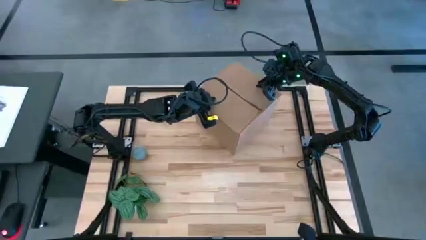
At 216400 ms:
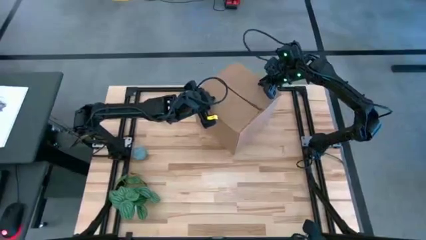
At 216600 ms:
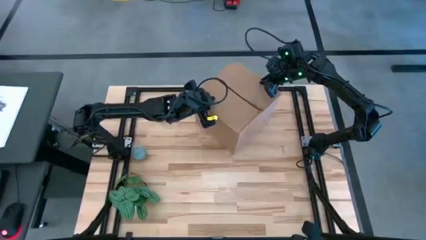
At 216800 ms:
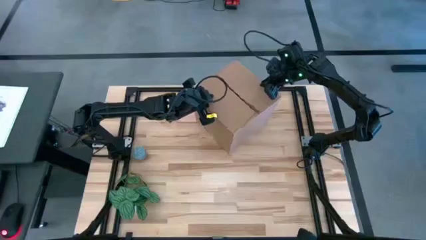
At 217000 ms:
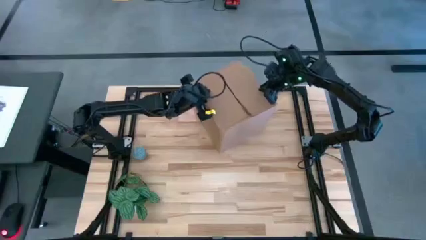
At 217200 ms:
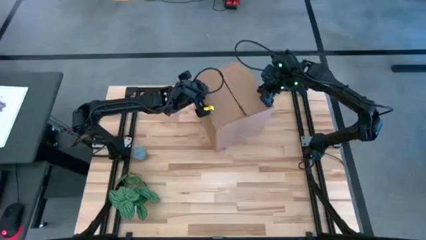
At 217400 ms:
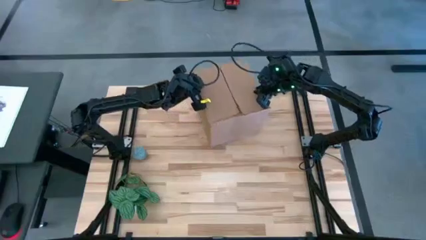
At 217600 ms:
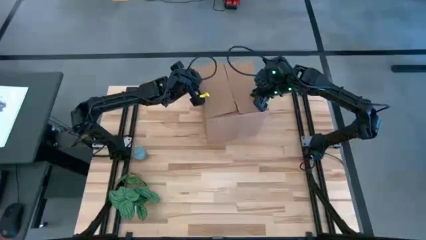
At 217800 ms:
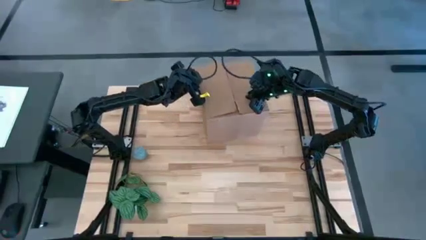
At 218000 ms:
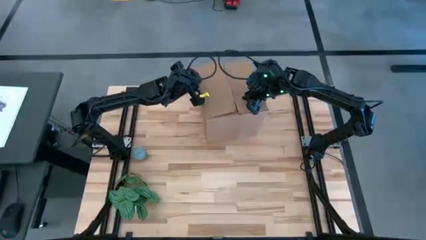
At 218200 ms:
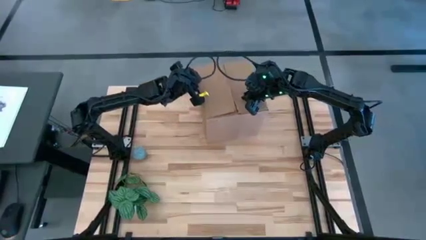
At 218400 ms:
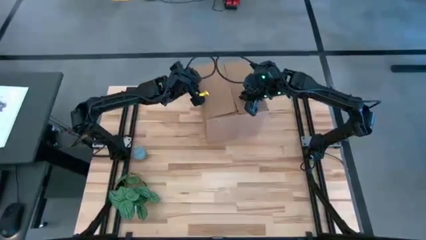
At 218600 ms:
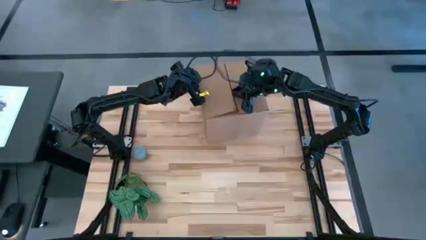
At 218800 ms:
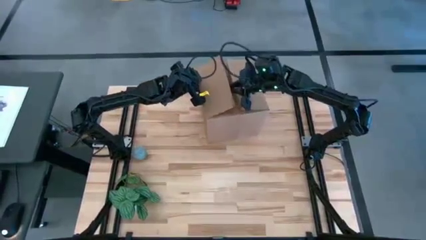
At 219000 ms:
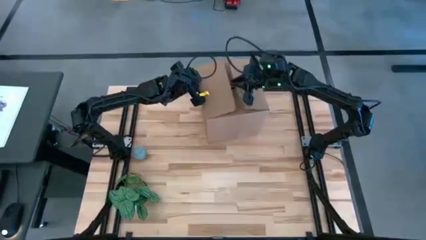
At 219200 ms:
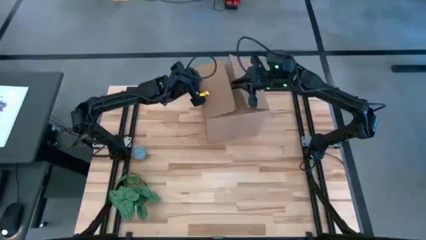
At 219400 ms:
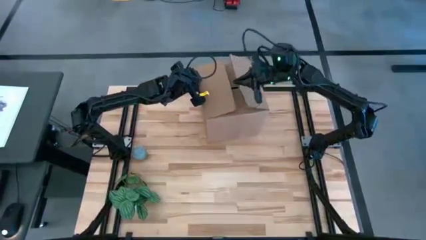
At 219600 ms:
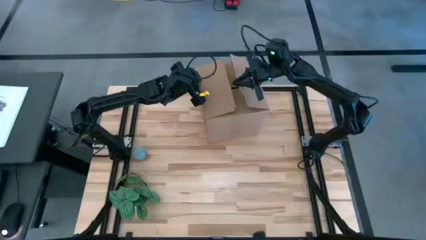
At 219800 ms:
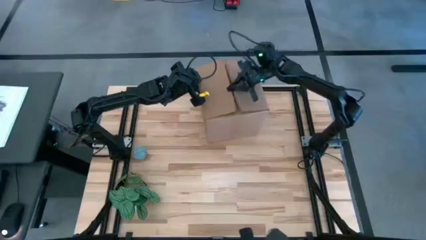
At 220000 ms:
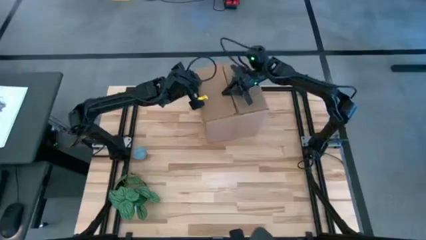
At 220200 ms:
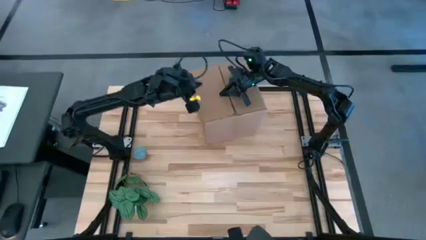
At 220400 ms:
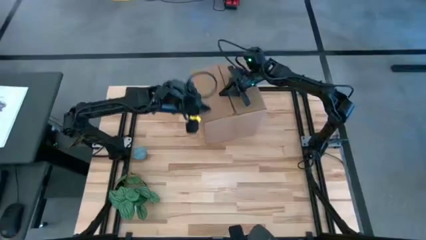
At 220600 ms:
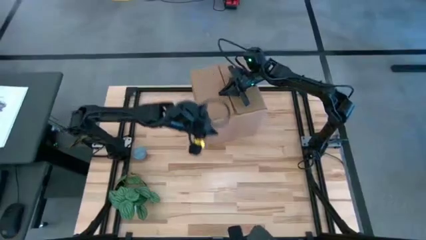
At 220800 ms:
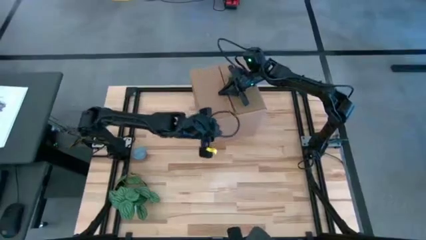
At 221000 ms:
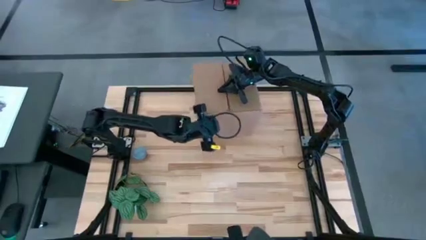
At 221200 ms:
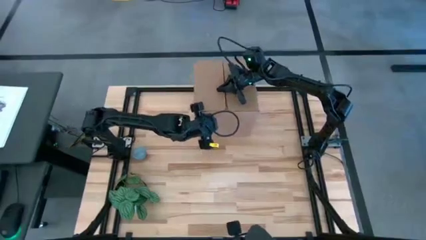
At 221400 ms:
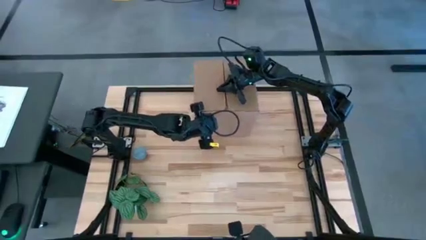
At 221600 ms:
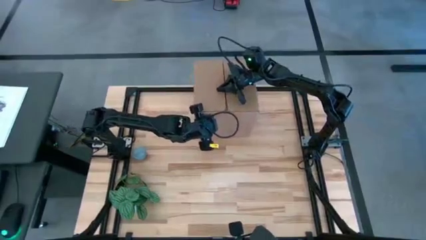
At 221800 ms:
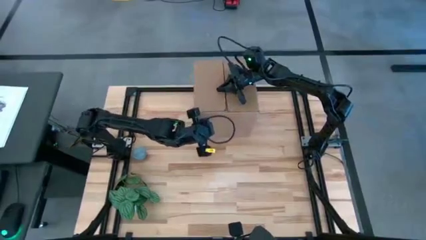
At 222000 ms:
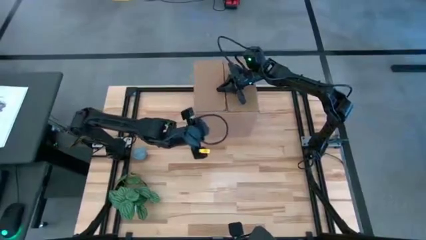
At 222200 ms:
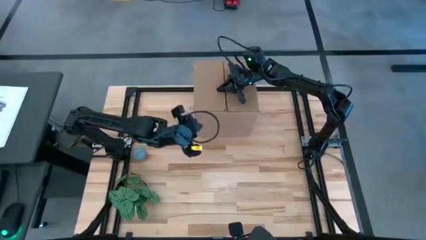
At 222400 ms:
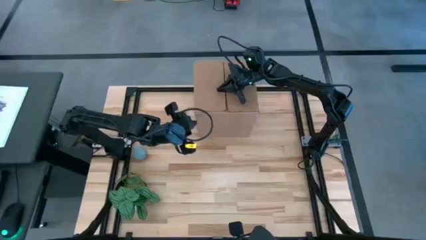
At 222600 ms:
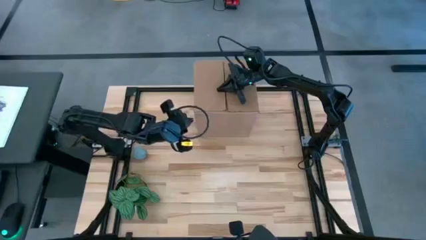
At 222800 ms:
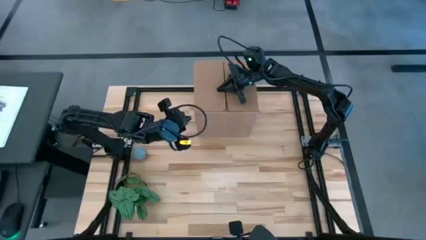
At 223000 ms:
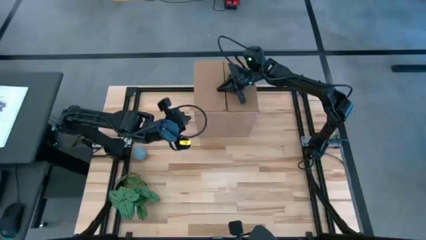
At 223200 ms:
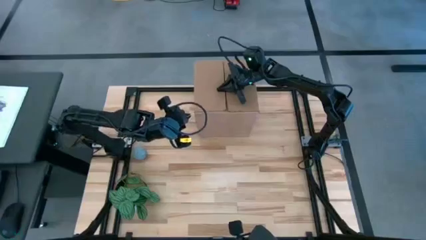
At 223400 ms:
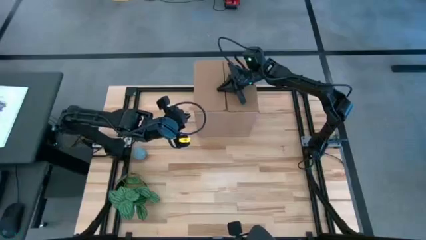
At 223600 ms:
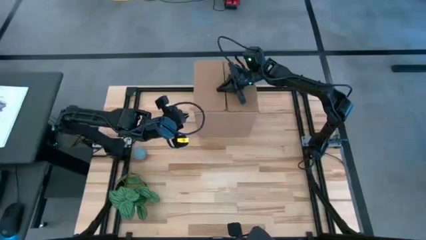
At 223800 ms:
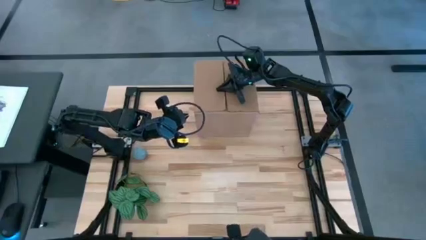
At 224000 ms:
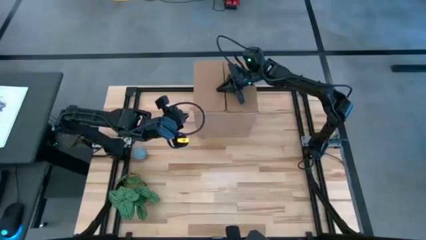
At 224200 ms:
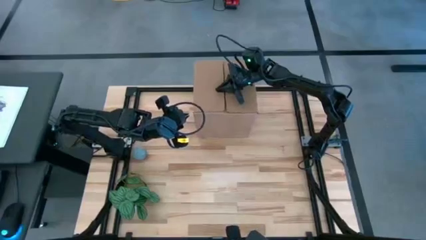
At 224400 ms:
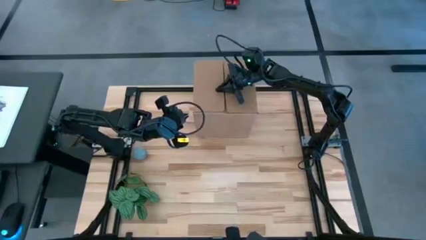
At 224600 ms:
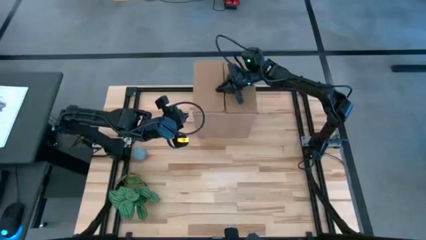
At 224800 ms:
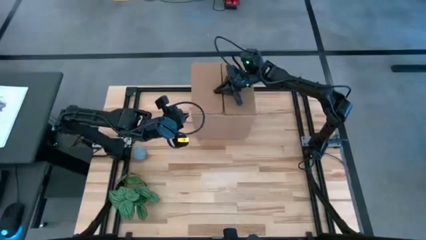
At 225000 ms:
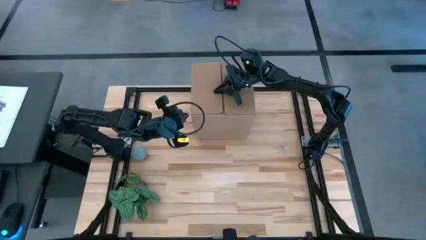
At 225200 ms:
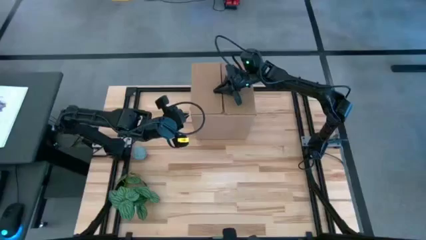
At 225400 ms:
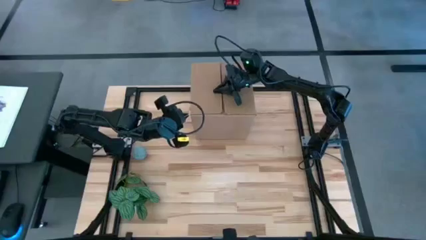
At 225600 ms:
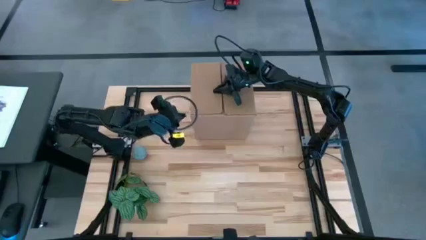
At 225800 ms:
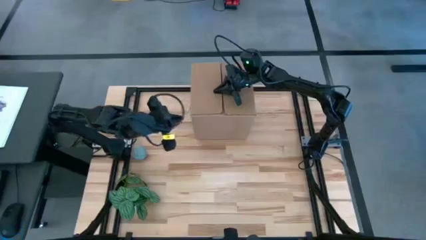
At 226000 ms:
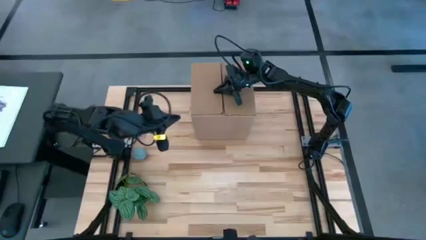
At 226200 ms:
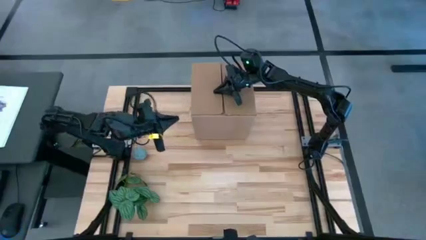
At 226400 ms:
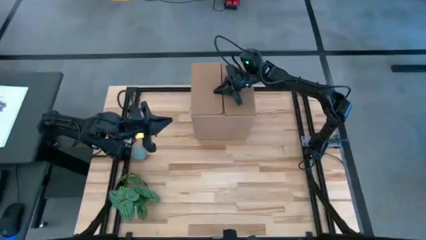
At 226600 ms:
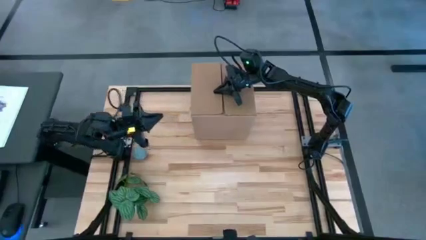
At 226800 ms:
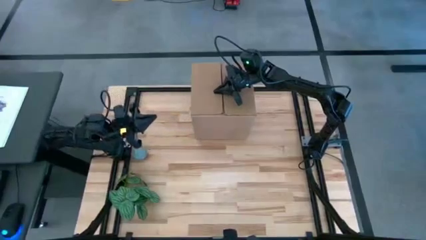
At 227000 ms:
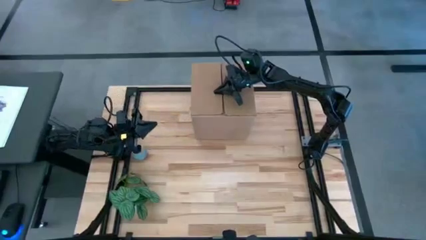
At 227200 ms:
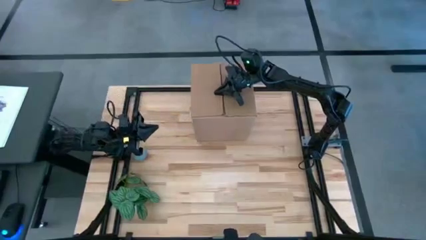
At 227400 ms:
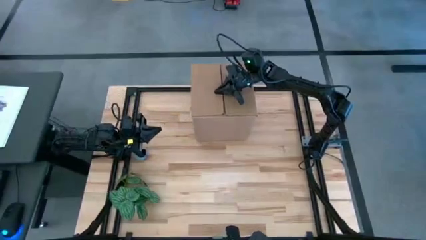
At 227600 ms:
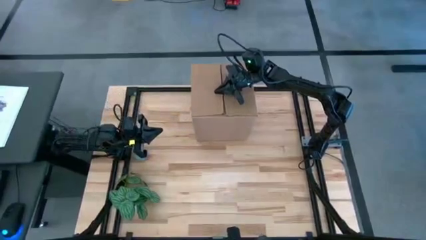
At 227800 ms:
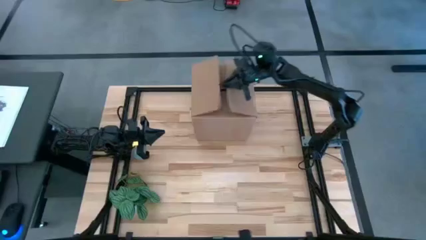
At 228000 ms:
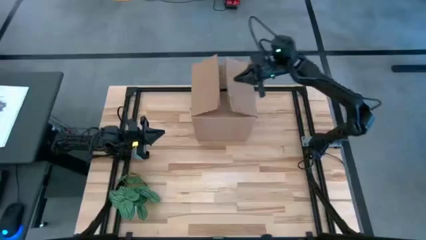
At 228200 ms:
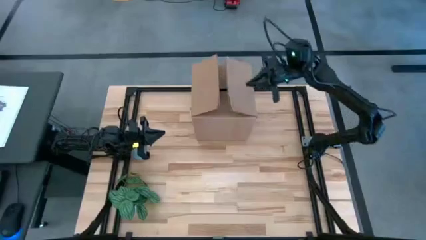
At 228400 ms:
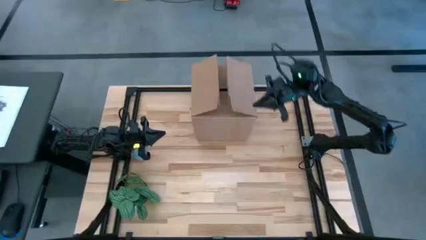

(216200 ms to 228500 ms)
Task: wrap mug
Close the cardboard box

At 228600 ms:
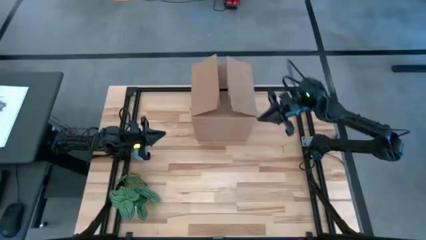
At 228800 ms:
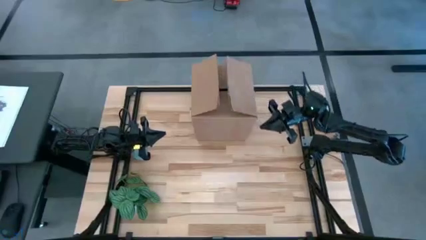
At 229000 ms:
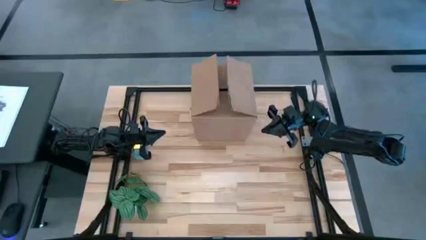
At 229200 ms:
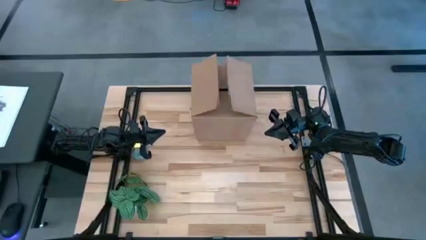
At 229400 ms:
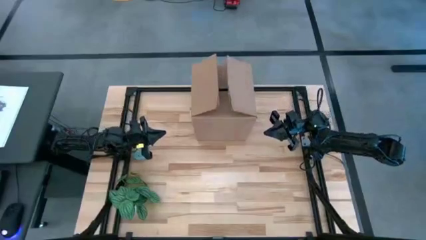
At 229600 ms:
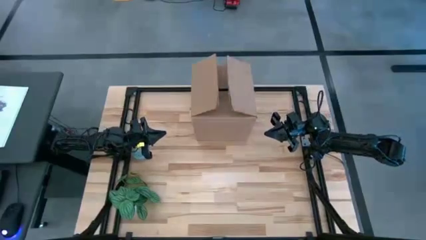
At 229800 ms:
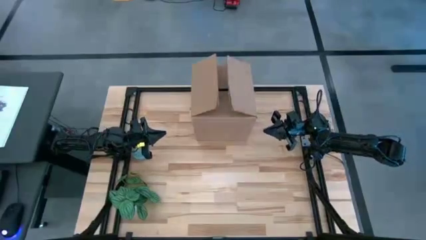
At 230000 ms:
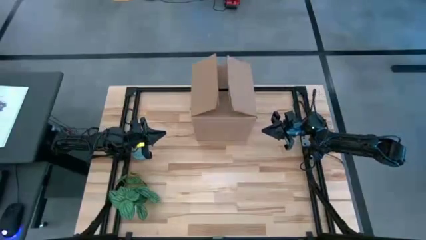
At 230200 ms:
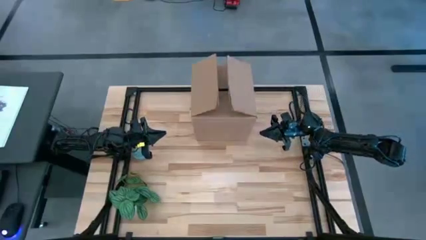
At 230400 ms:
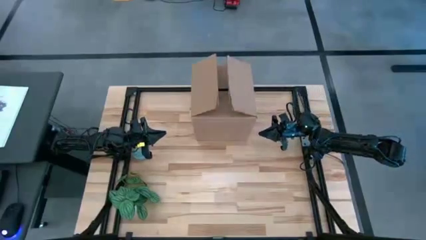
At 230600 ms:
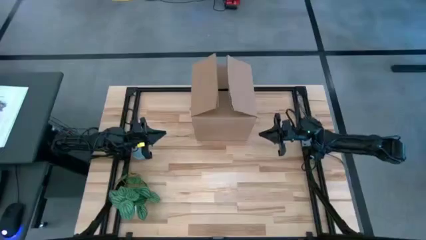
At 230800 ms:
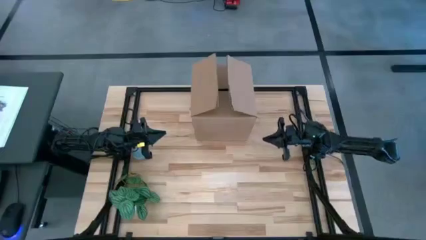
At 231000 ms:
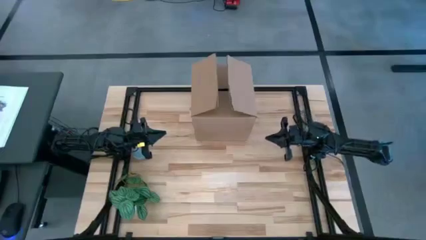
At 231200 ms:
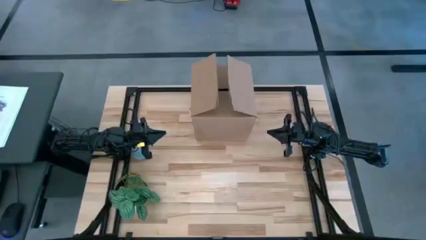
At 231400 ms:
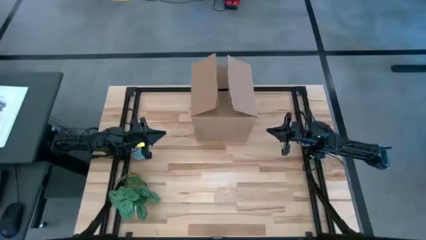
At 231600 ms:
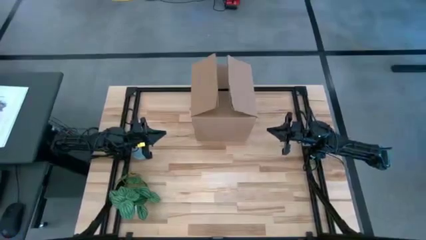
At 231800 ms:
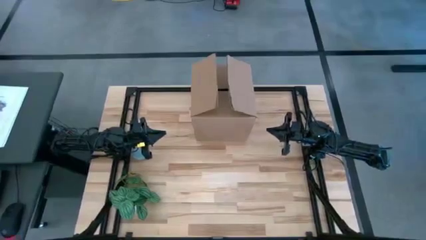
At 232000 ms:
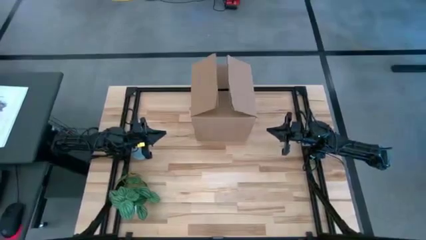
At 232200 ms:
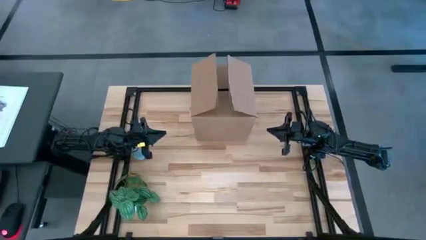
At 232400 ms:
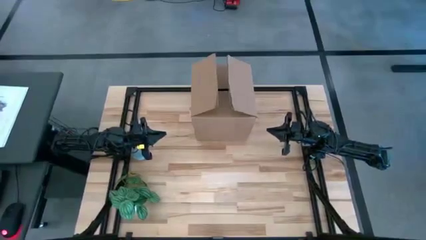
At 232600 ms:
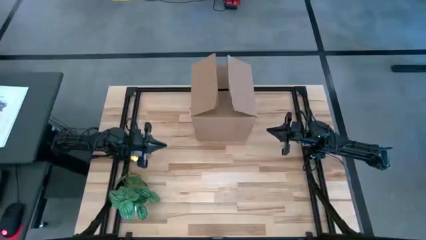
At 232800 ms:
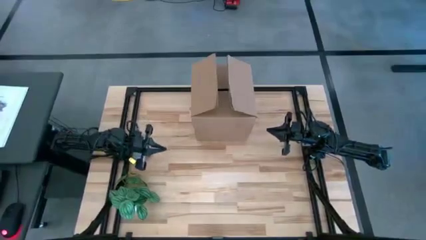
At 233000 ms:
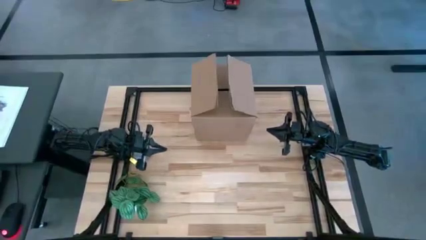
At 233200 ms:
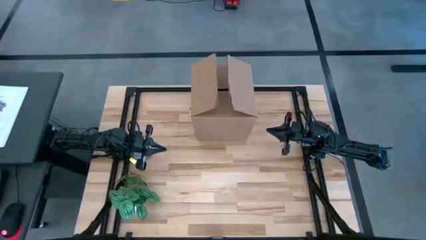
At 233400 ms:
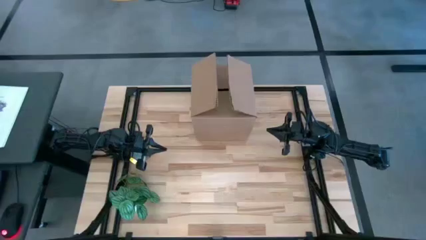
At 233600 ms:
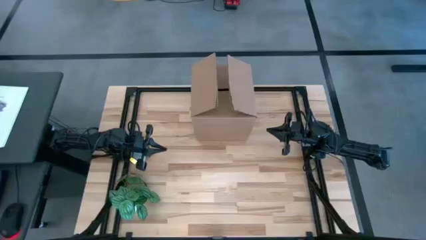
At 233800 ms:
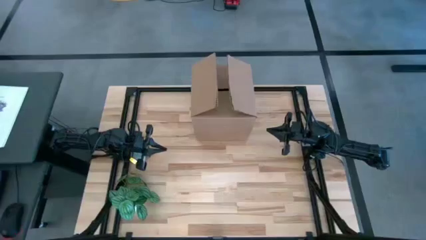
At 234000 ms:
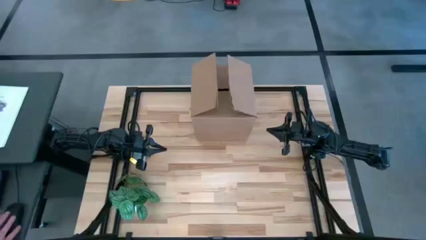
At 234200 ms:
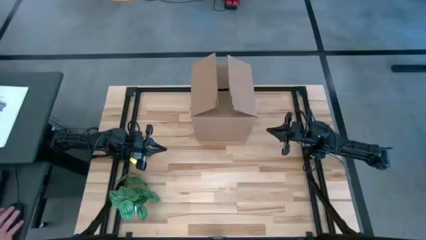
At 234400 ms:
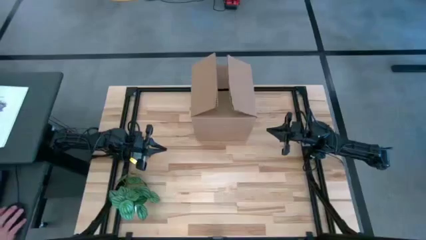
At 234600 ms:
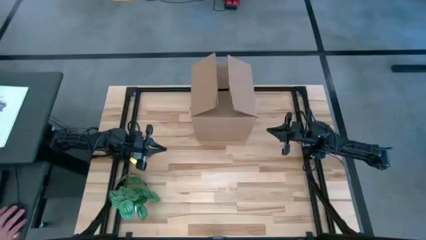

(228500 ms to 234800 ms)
Return to Home Position
